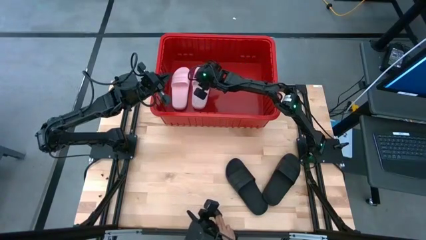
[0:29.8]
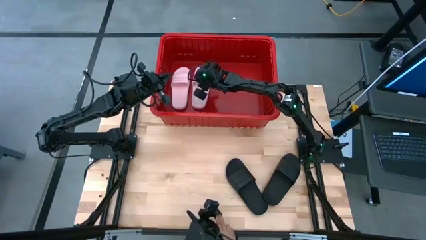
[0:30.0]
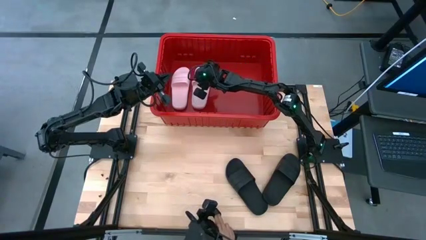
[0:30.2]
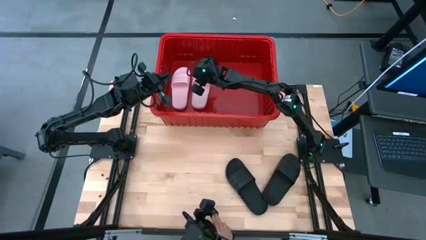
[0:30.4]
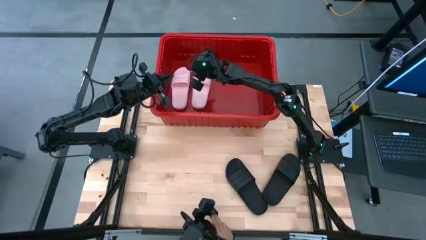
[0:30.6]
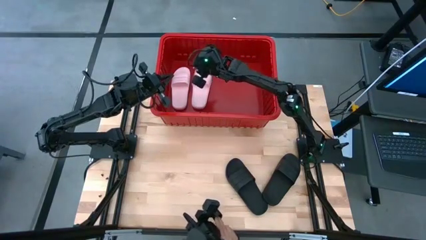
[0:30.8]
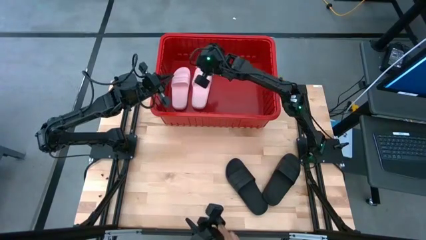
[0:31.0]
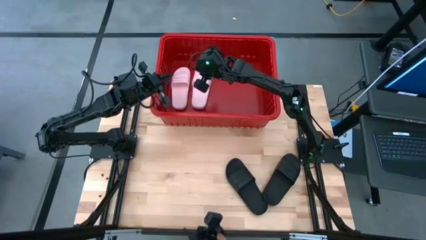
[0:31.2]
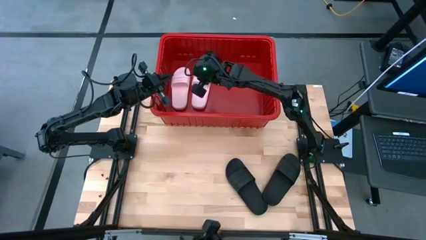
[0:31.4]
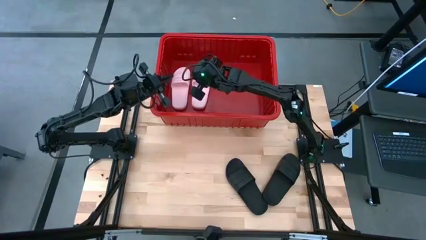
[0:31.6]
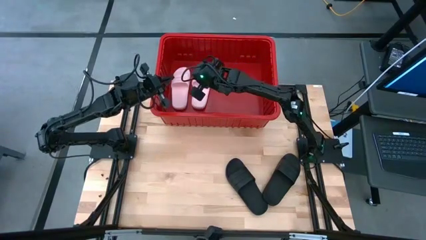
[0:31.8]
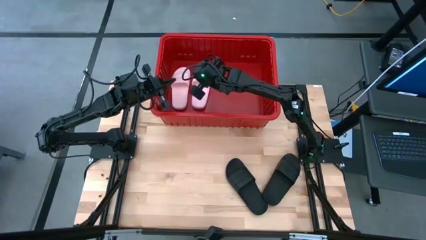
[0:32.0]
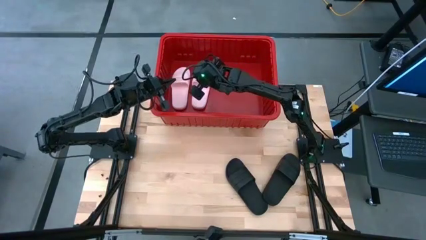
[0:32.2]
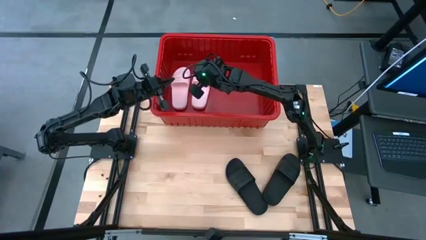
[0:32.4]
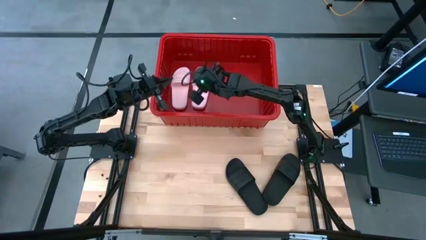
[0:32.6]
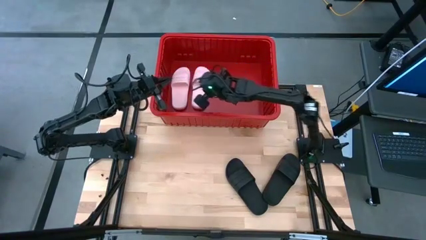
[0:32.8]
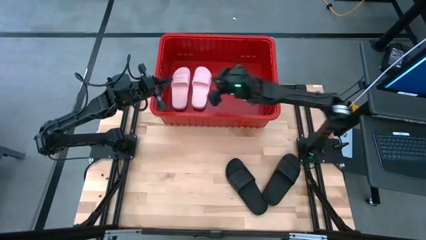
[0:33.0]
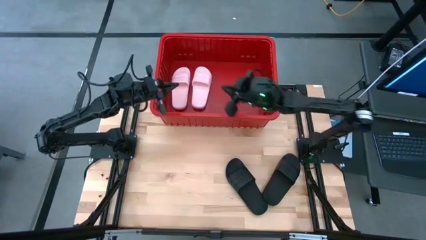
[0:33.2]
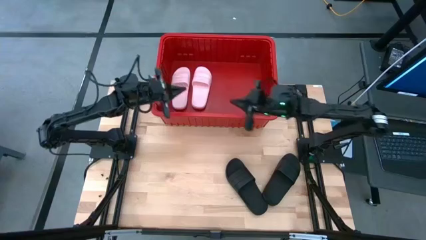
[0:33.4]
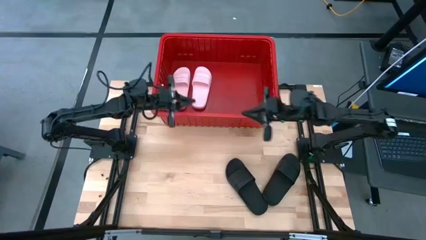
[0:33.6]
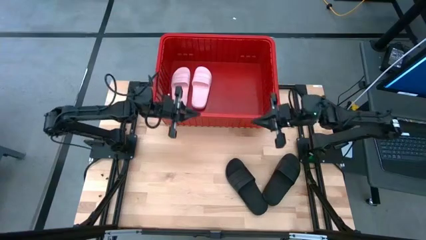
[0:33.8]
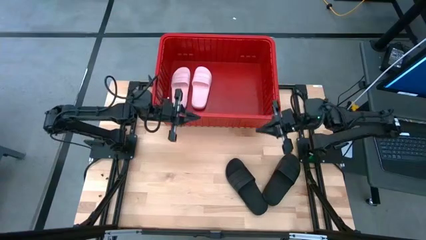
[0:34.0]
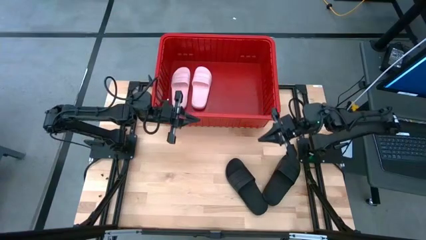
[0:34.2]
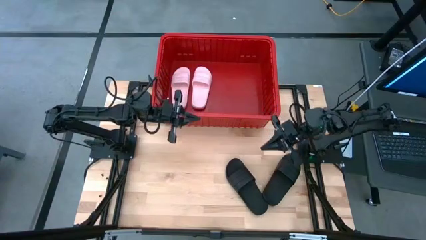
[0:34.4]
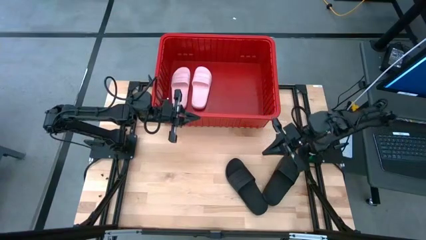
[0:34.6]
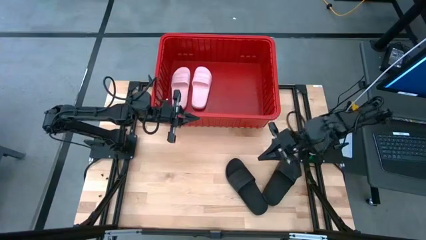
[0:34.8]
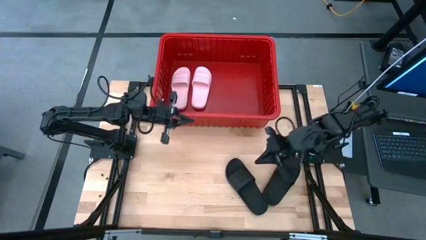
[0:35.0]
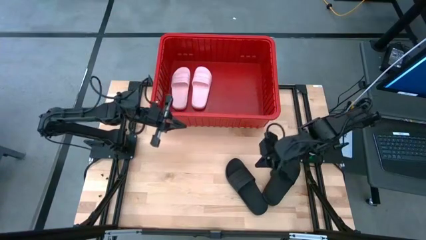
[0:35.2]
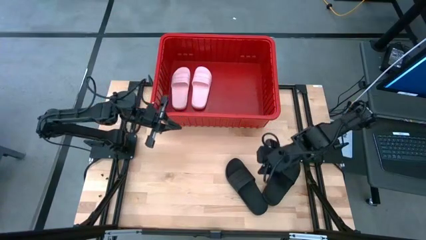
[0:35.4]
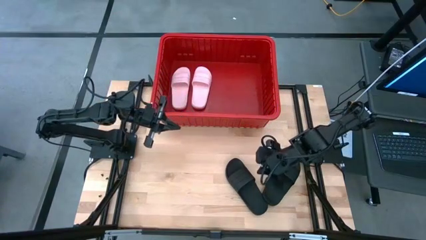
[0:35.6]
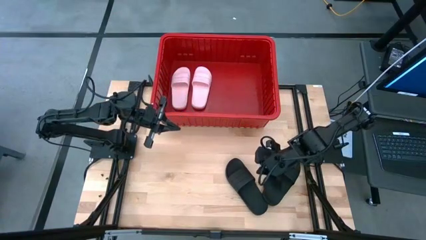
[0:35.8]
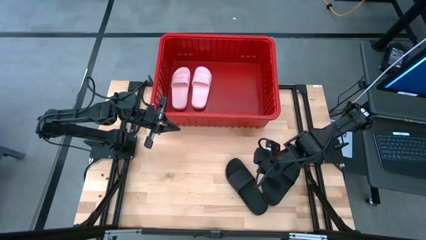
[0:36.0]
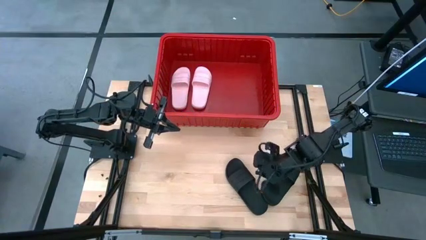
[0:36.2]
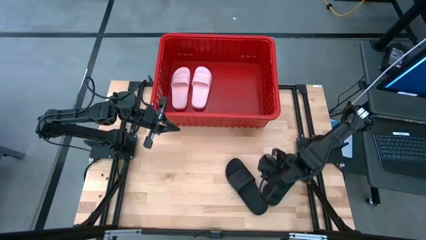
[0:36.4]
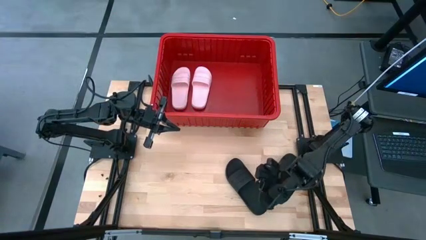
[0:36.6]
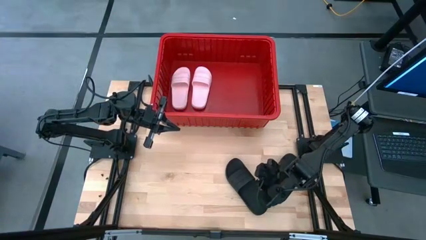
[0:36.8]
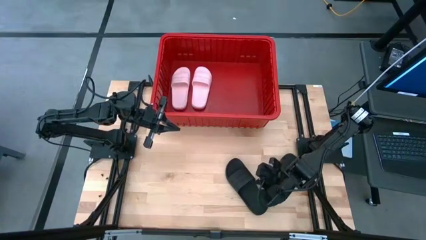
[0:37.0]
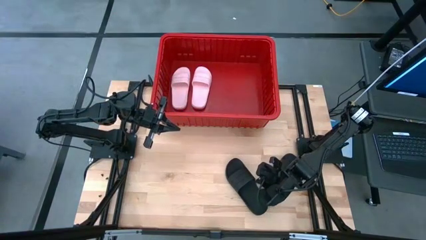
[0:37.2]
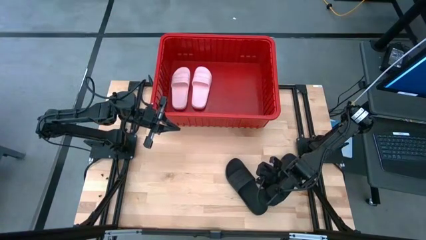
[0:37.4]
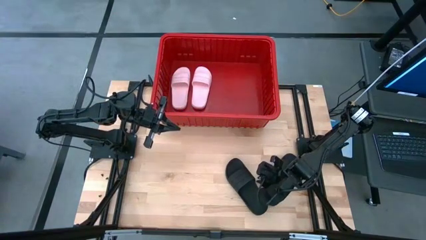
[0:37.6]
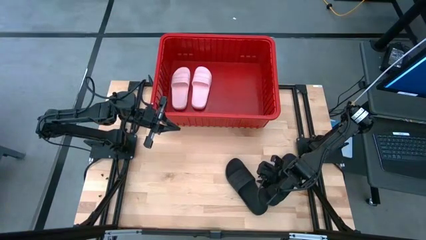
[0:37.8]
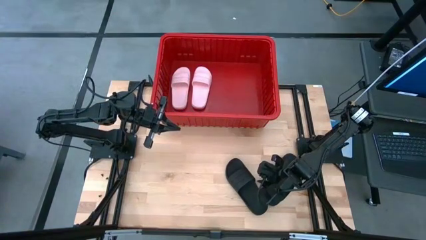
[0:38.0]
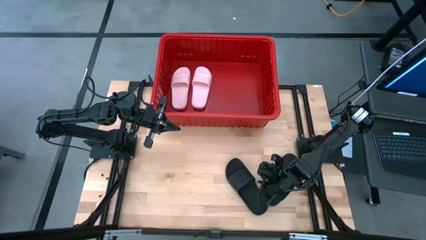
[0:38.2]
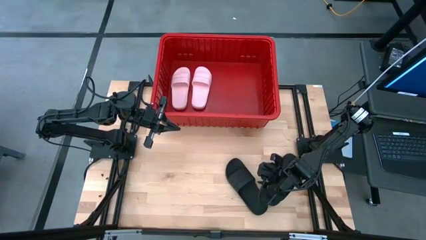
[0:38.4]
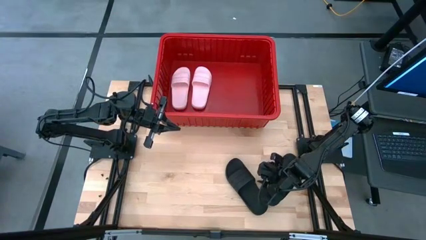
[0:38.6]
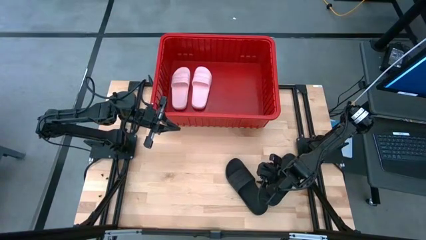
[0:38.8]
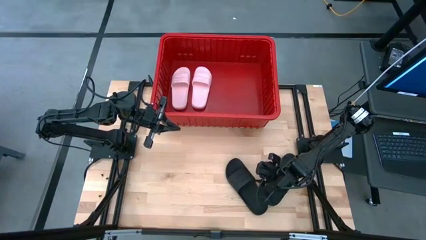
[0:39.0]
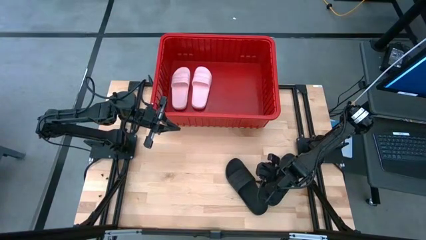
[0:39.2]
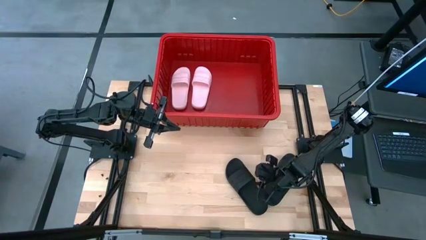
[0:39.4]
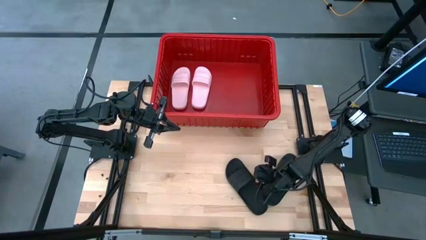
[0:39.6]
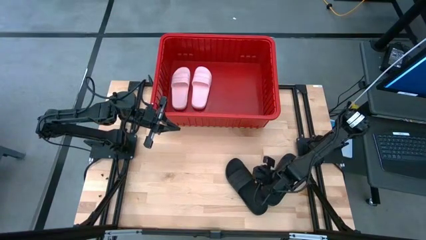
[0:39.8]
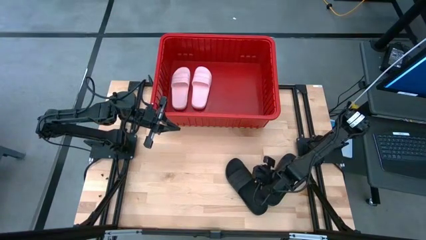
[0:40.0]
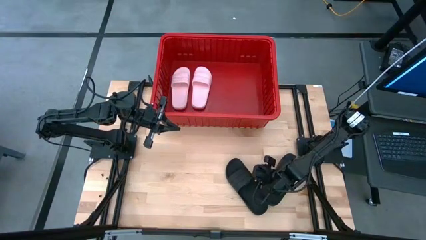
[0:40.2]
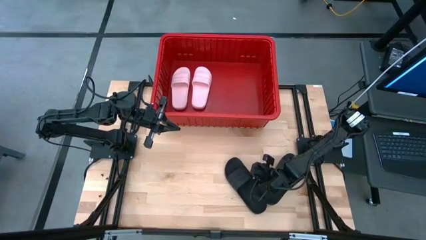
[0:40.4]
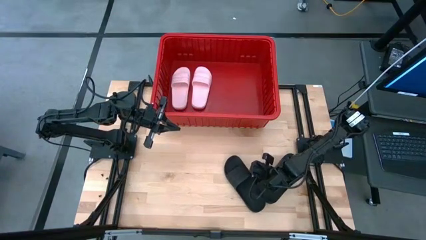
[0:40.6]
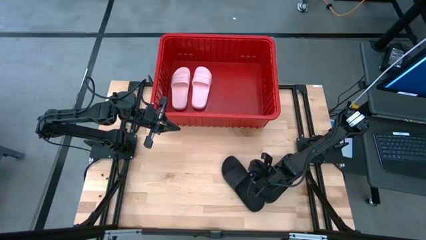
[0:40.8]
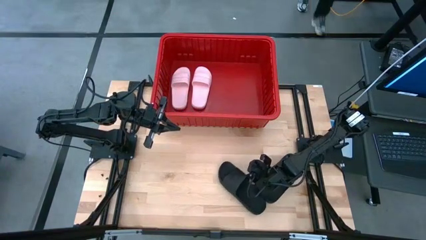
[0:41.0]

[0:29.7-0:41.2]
Task: Pick and place slides into bin
Put the left black slide into the red bin
